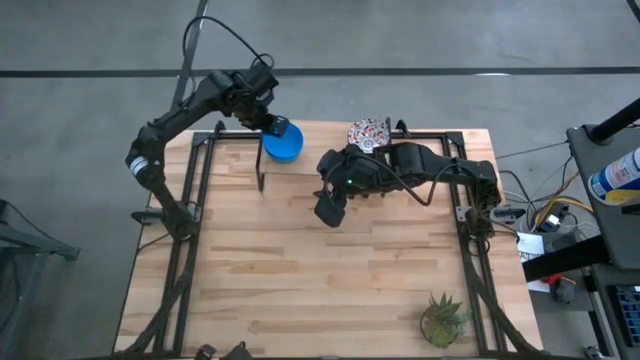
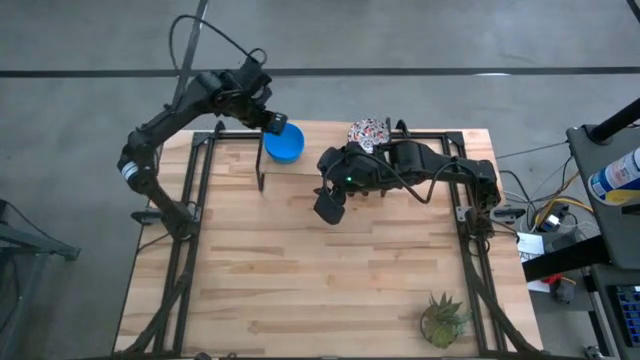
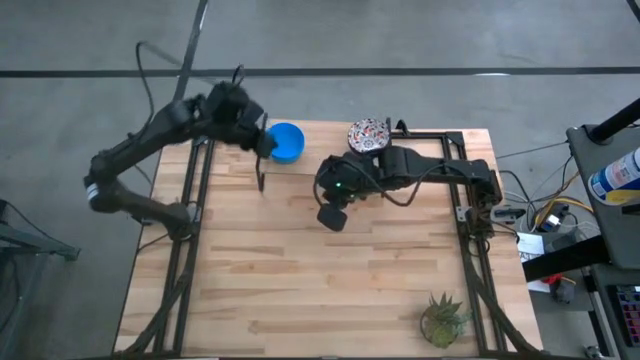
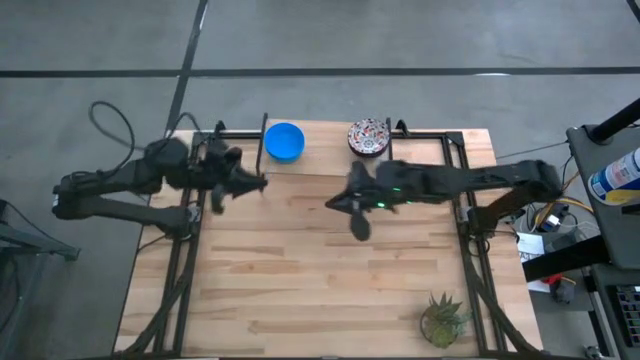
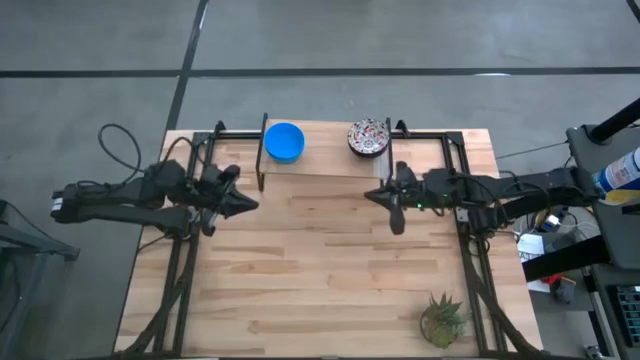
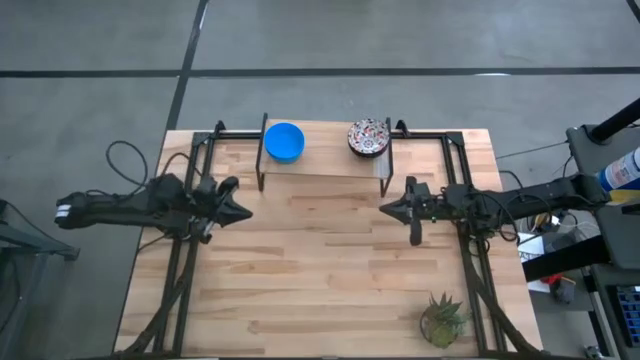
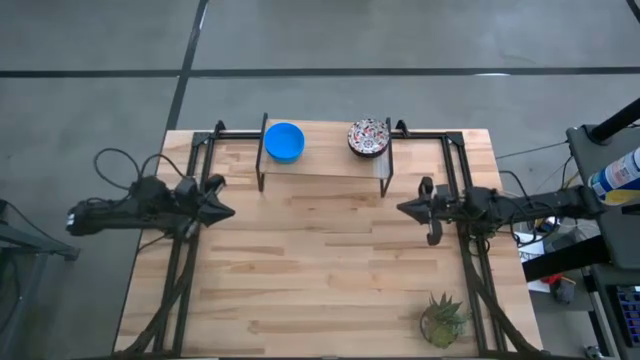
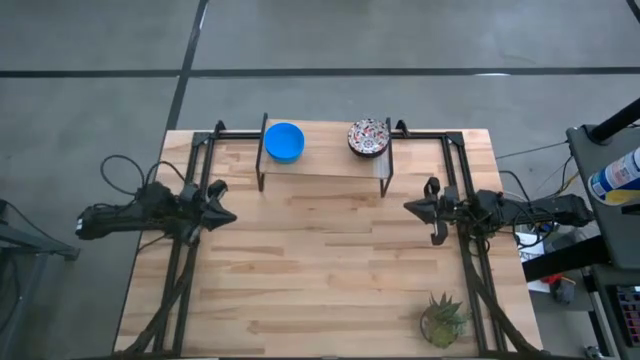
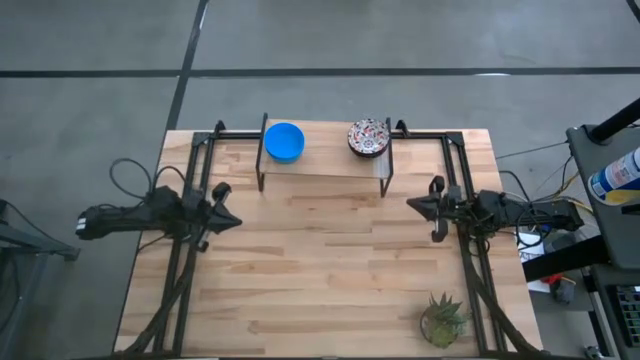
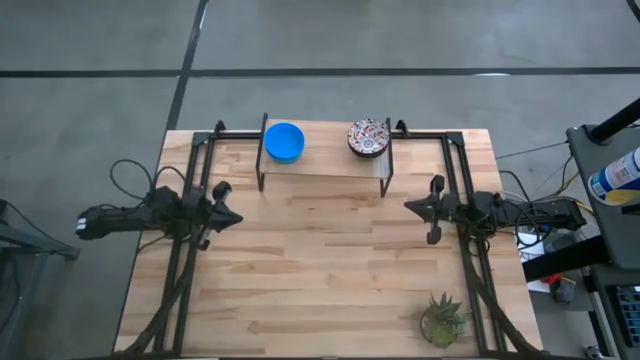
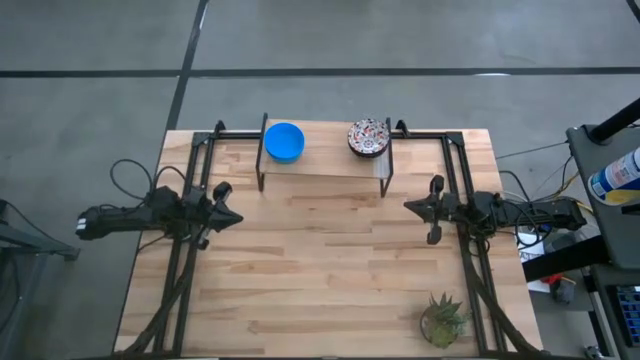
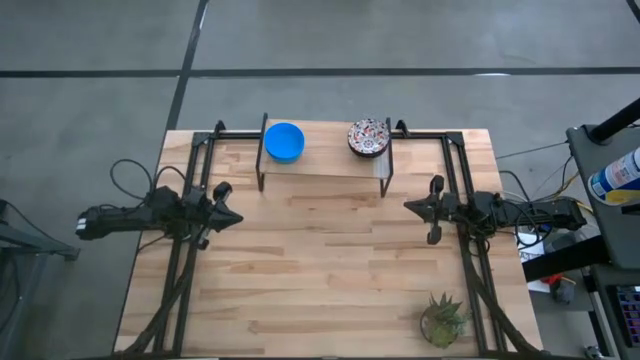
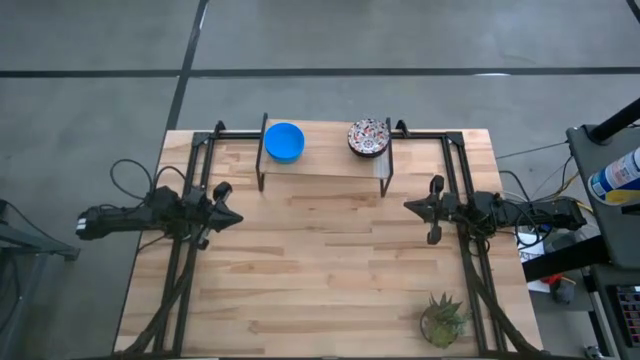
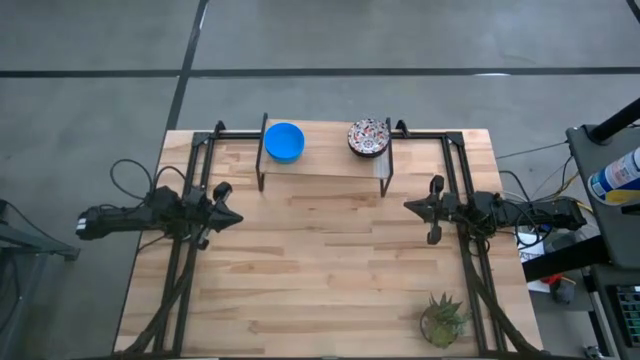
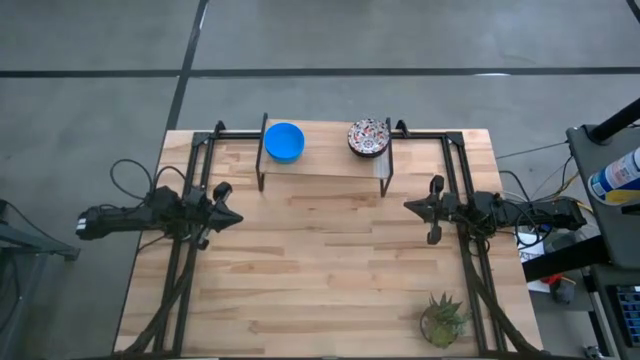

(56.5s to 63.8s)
Task: Pick & Place Mini bowls
Return to Home Position

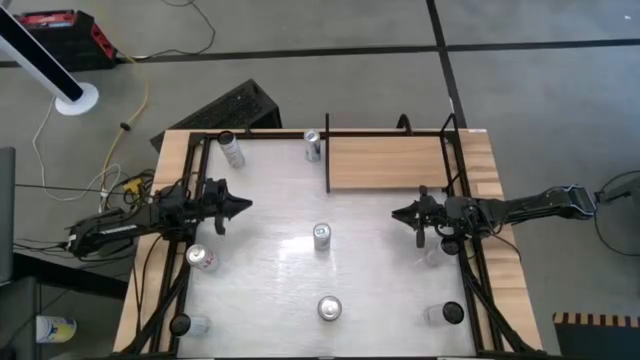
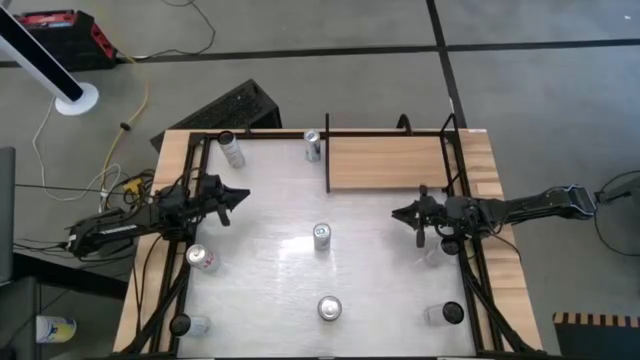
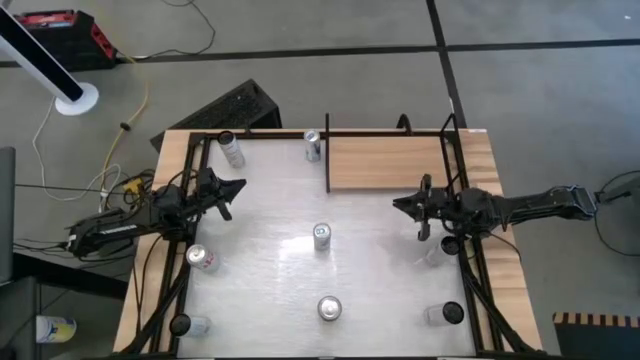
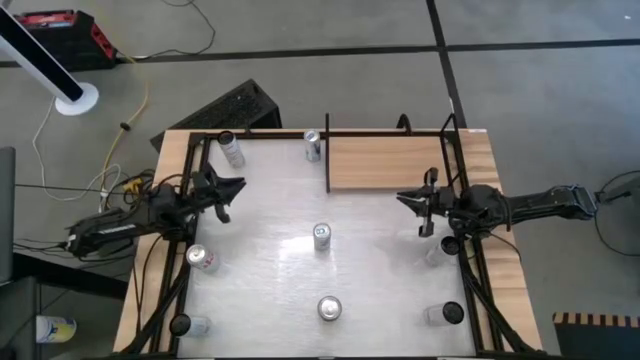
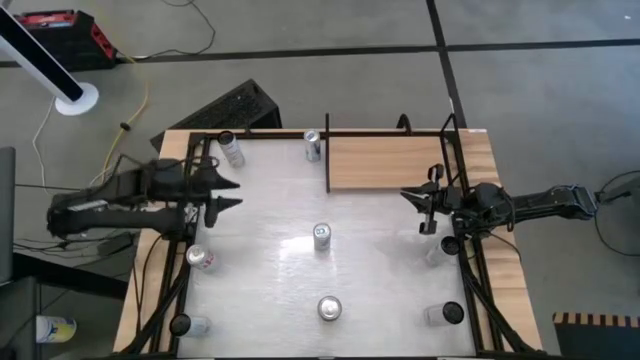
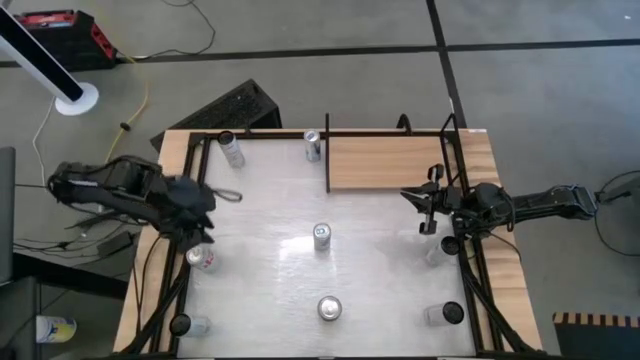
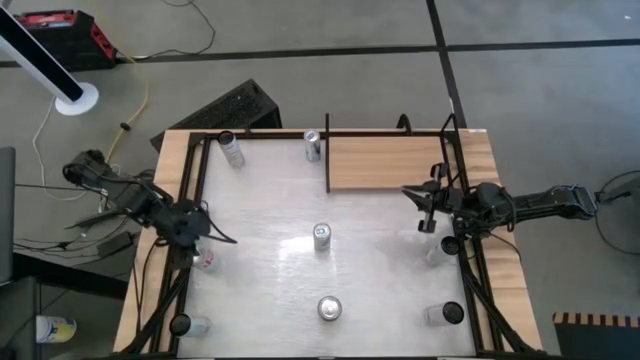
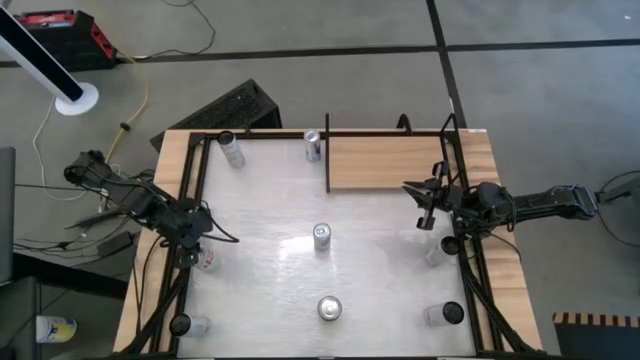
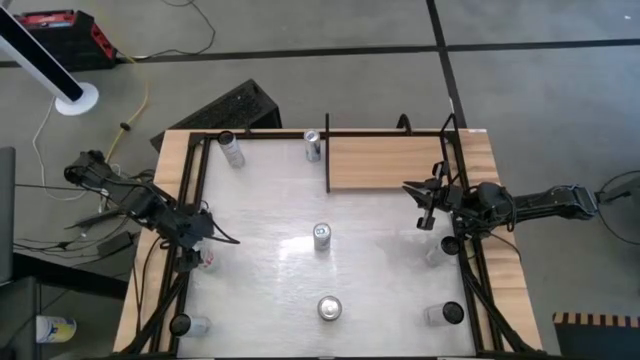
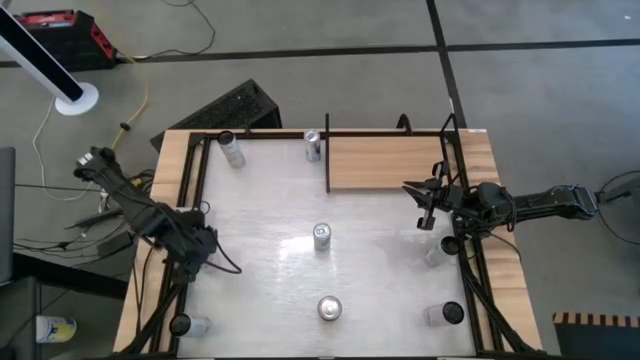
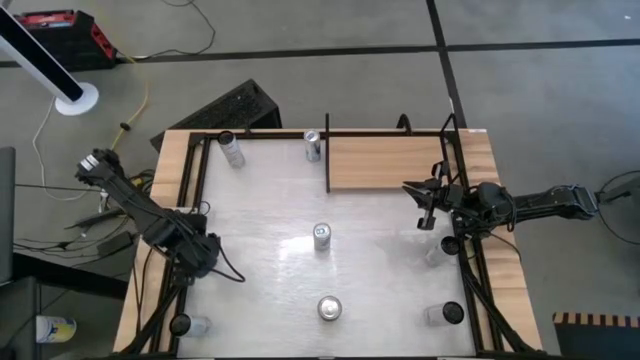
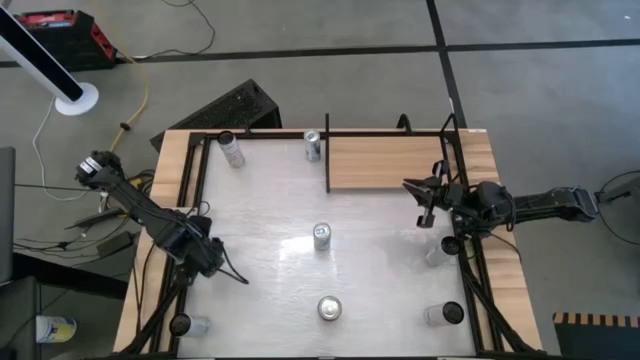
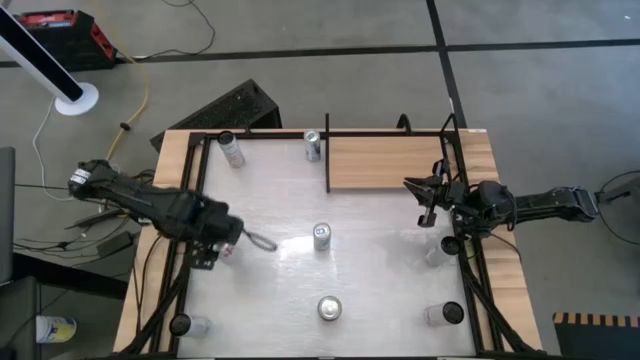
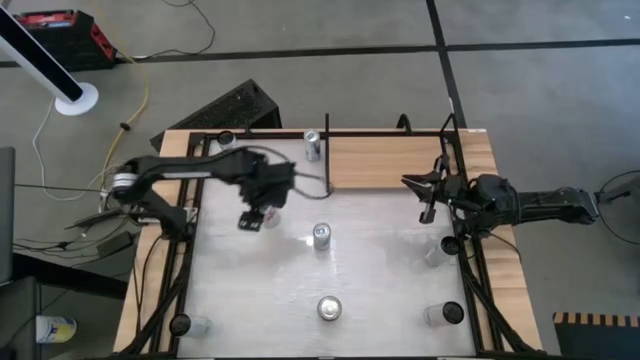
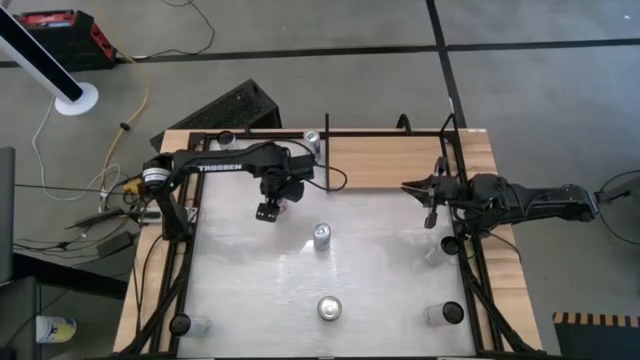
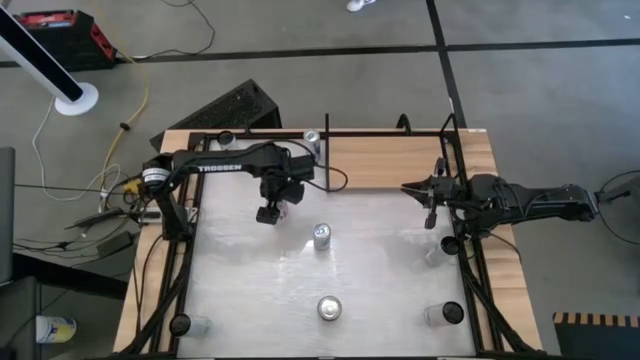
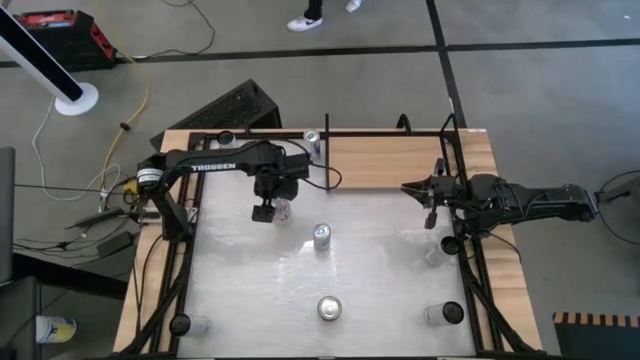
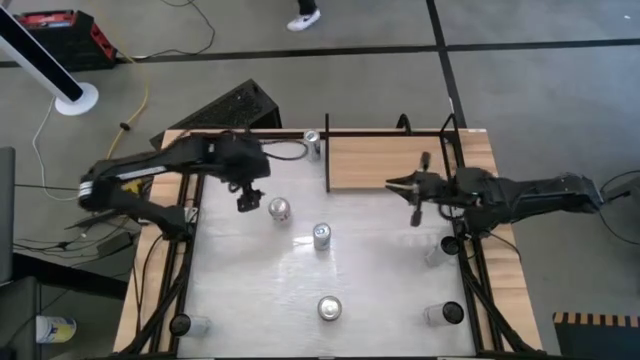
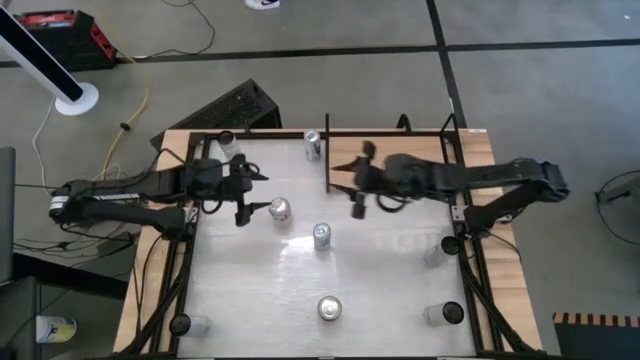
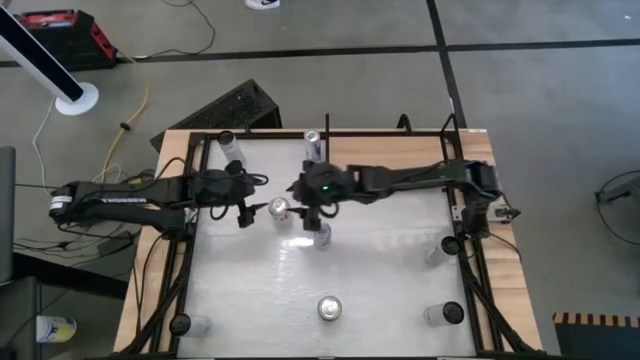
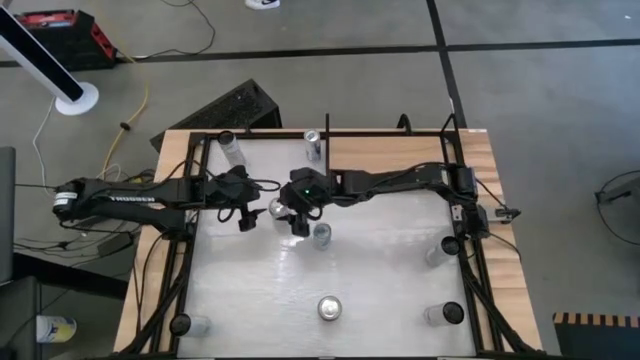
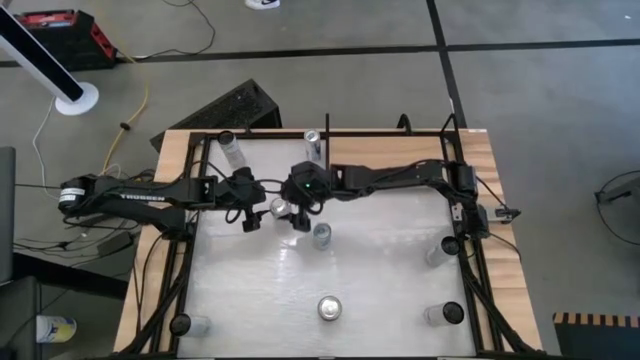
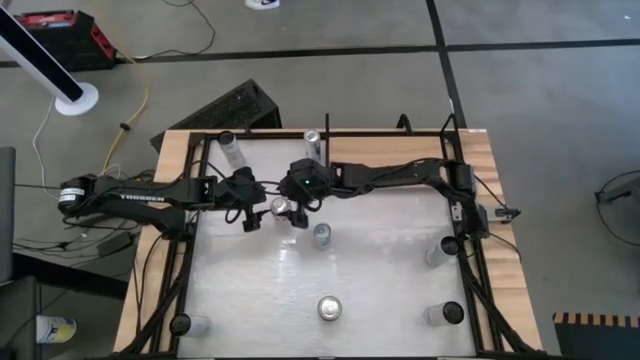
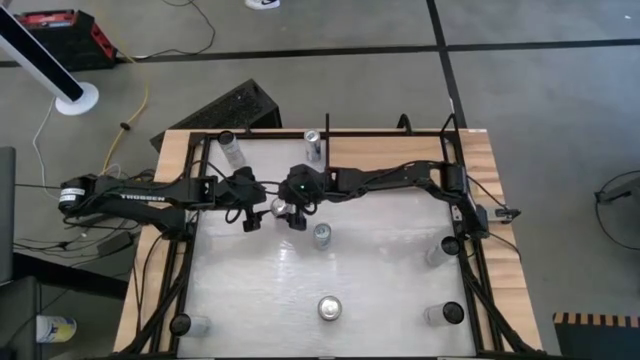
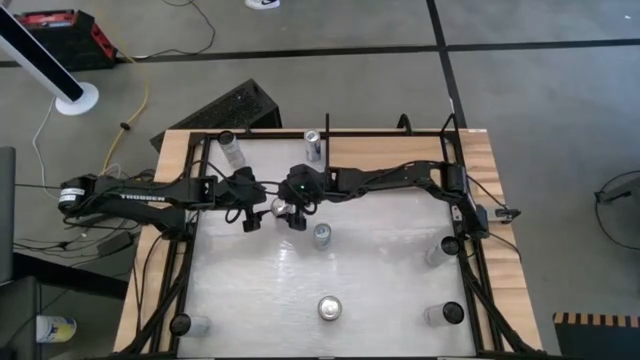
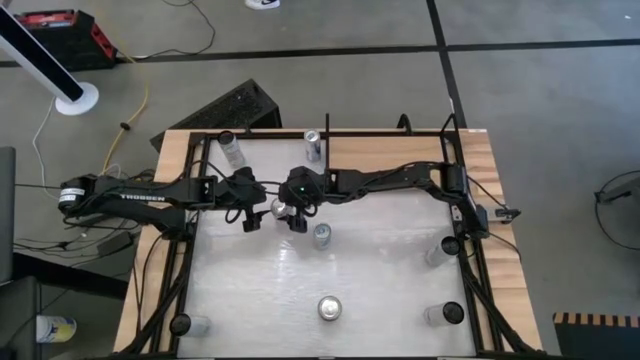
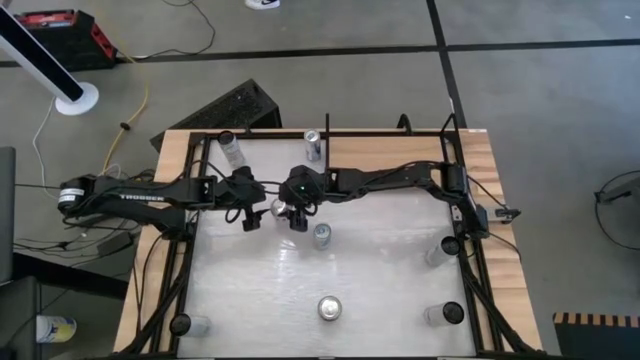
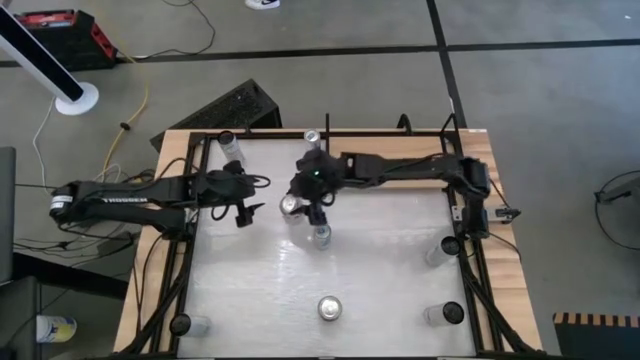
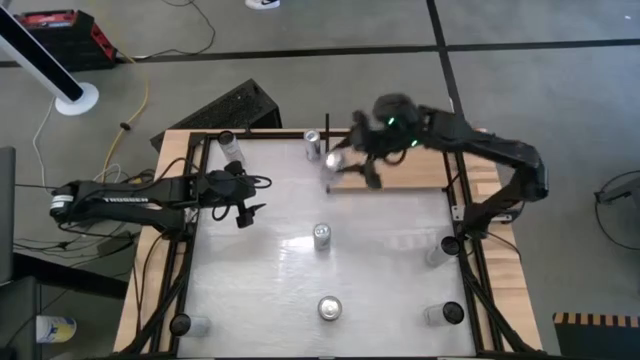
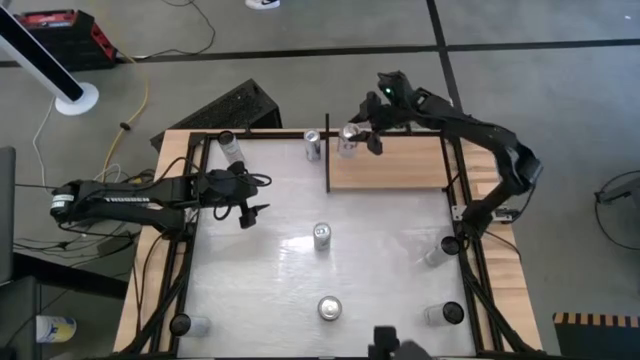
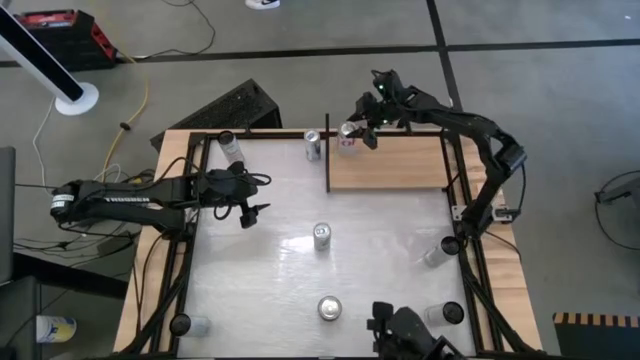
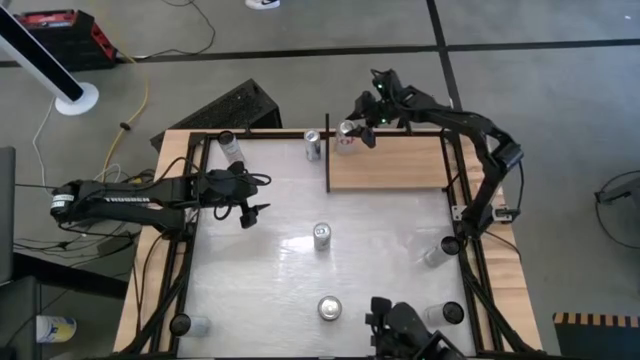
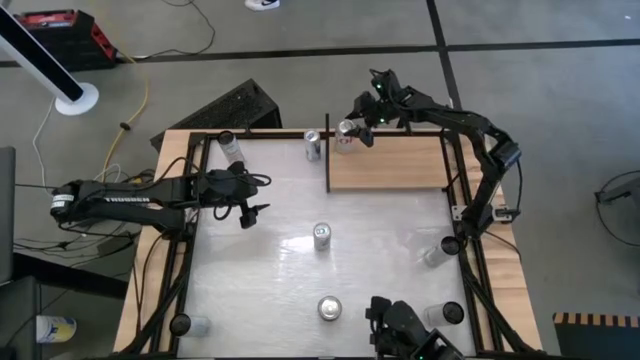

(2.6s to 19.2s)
Task: Place canned beverage on shelf
Put the top red-silver soda can on the shelf
